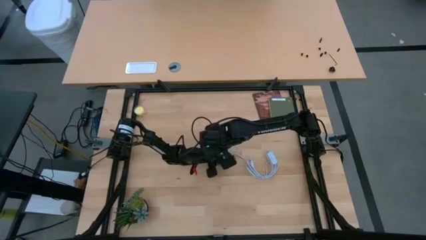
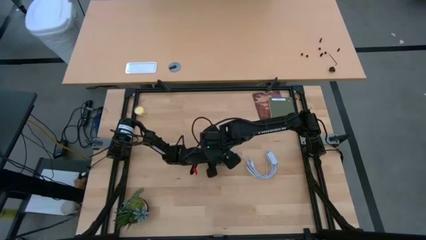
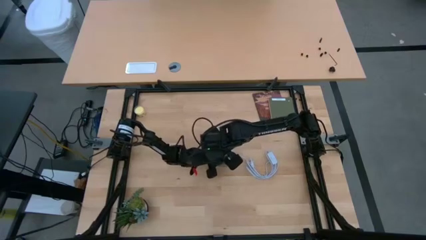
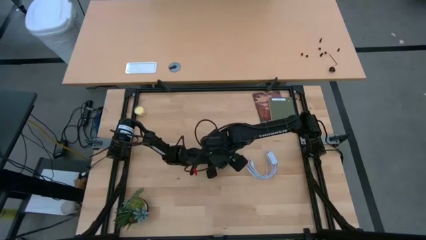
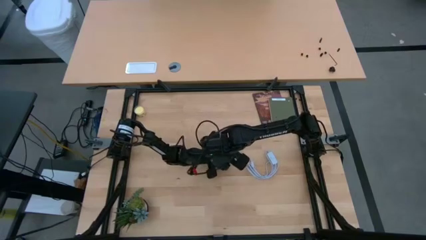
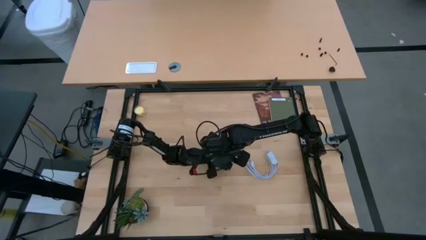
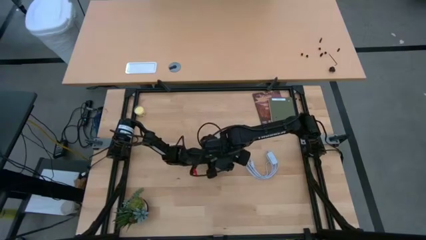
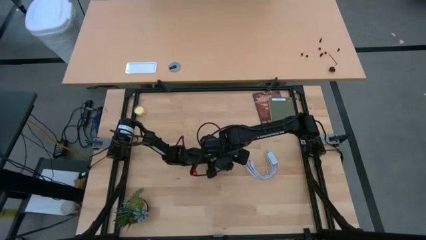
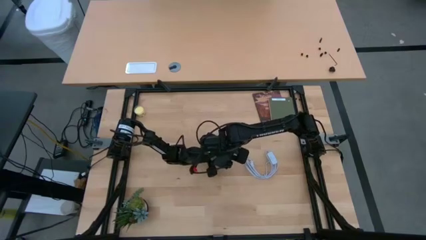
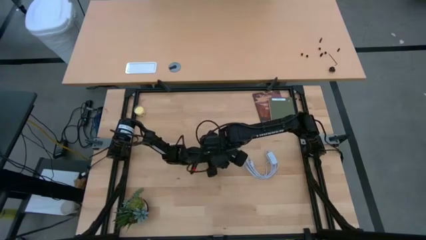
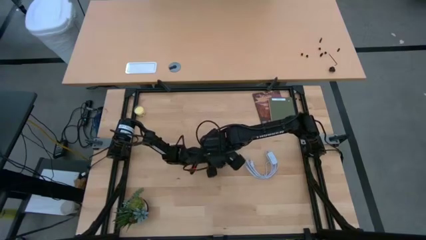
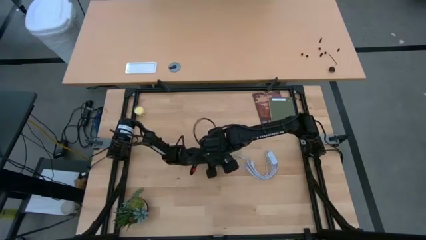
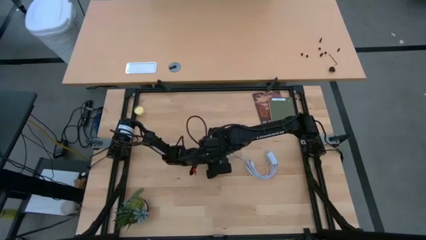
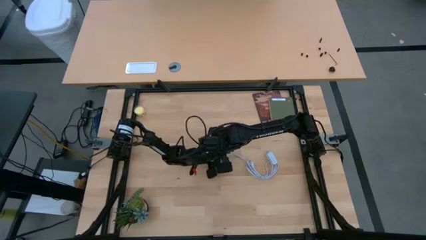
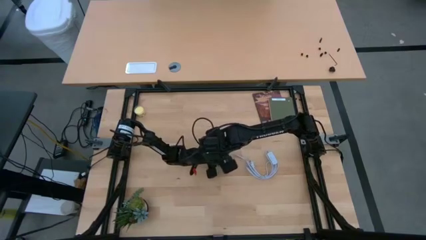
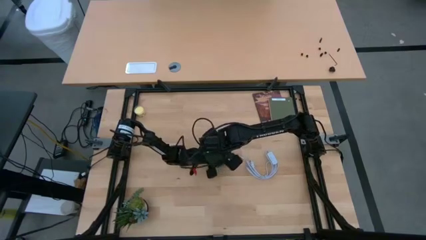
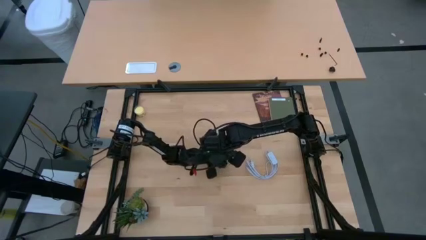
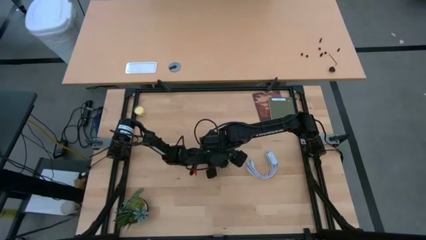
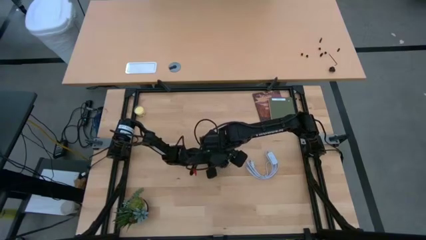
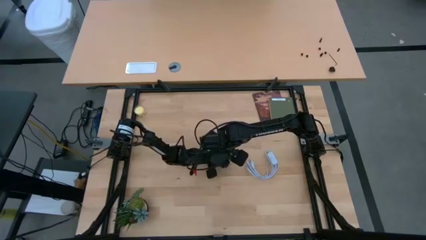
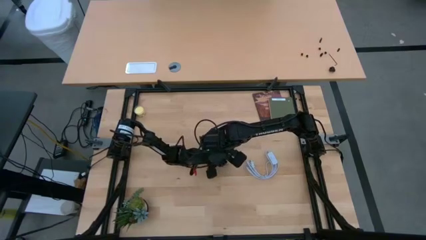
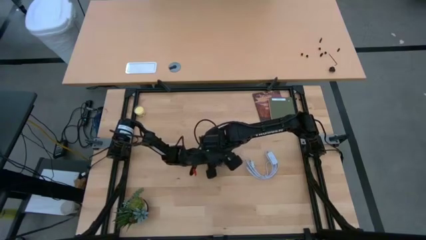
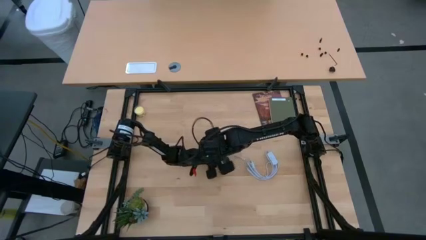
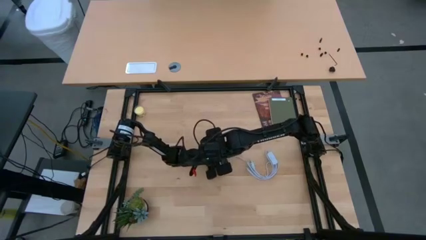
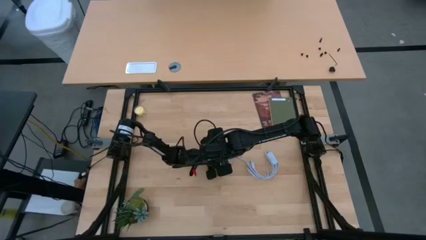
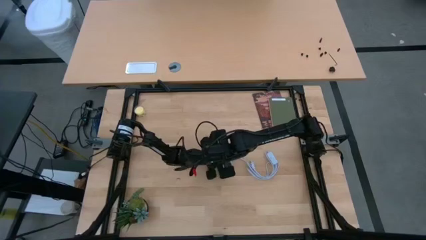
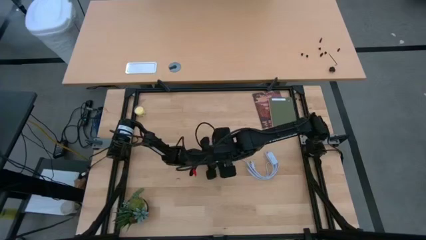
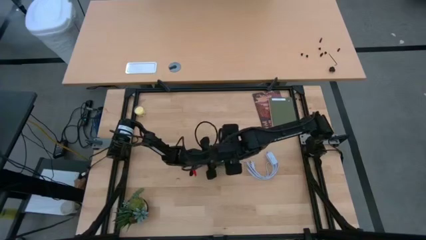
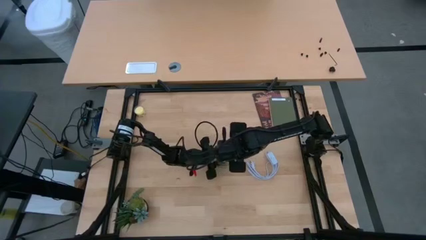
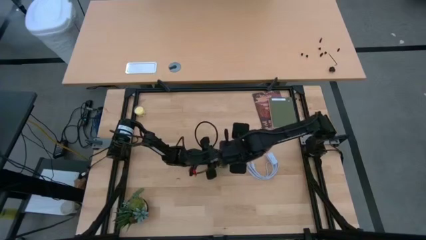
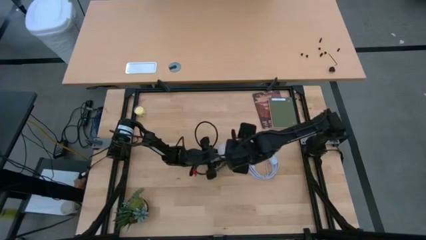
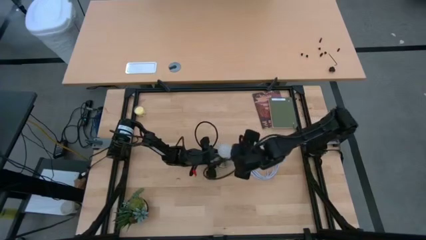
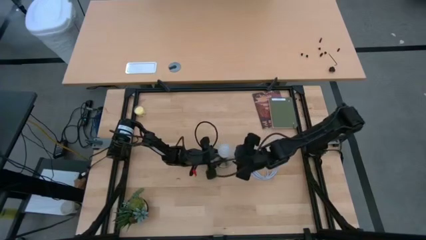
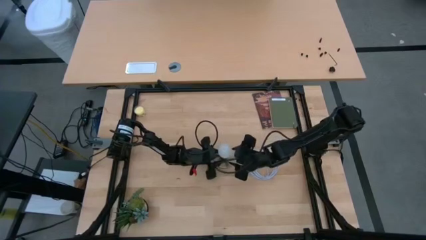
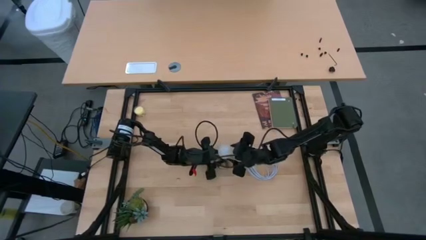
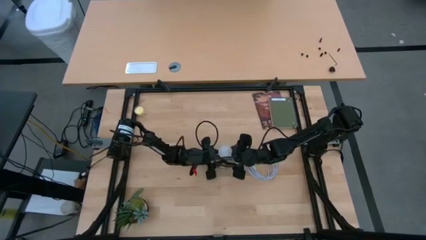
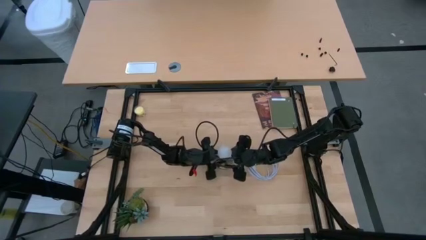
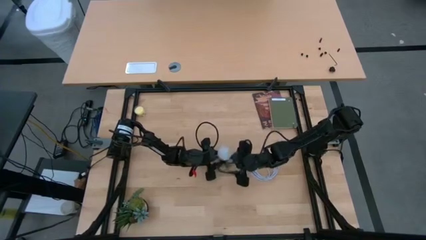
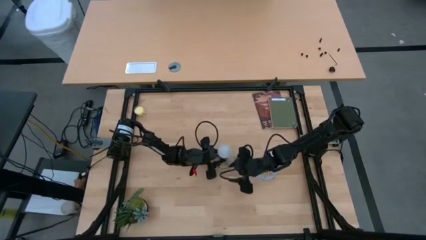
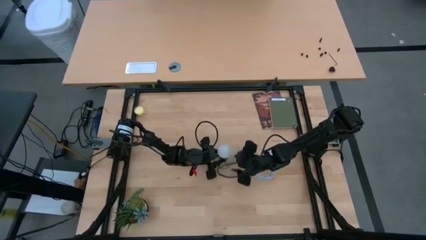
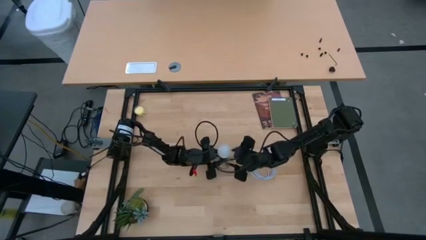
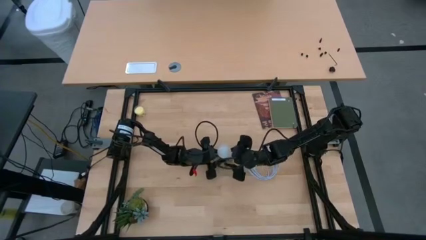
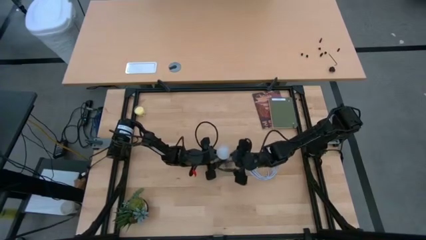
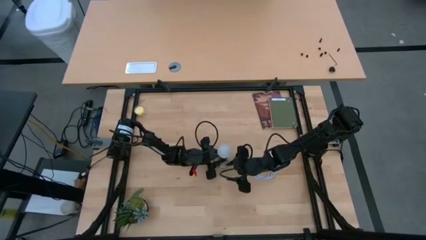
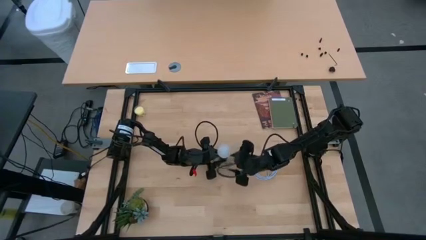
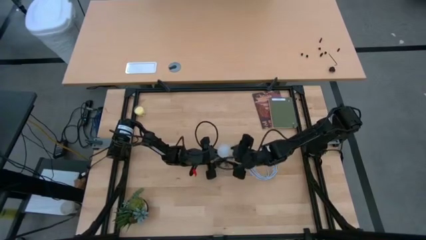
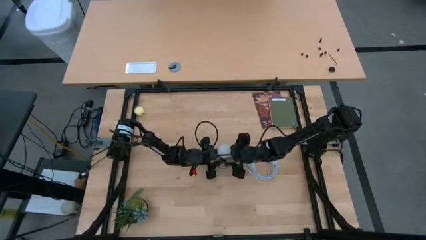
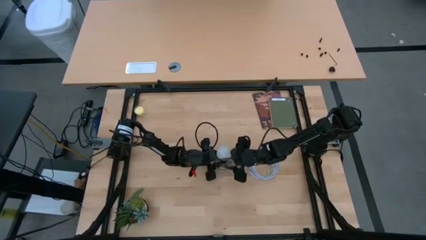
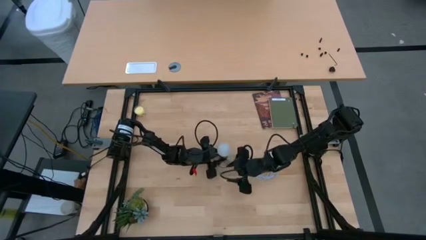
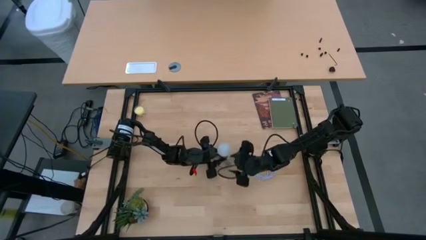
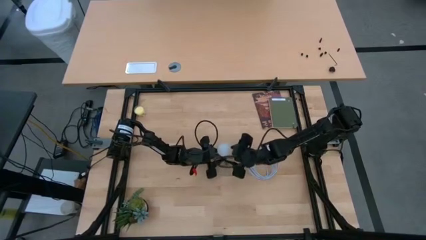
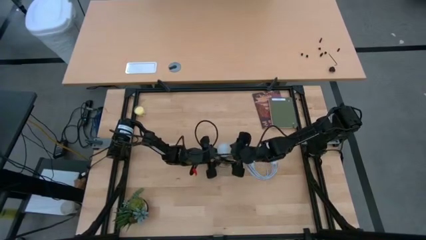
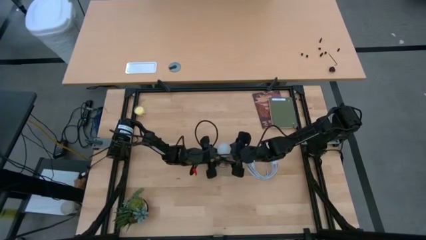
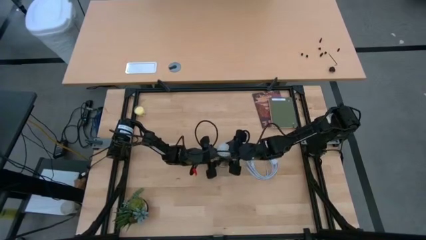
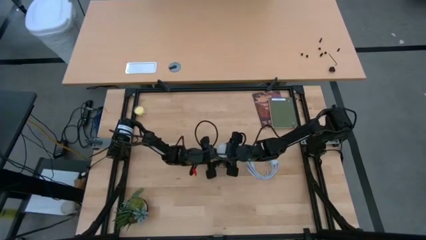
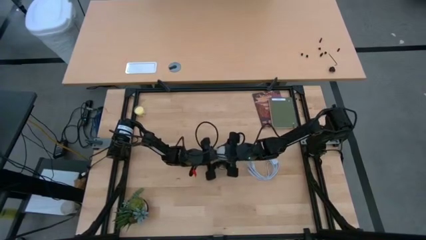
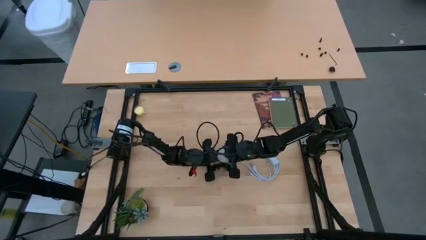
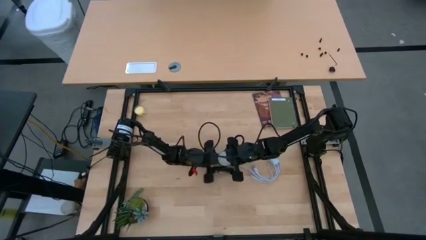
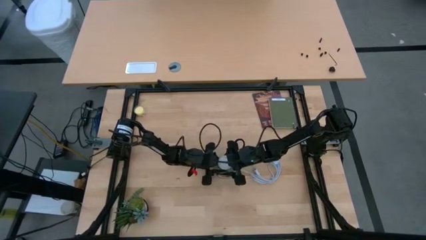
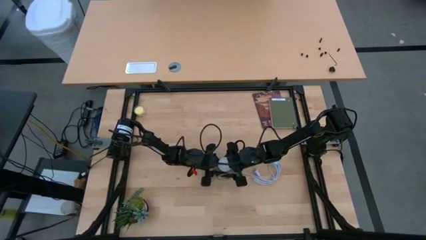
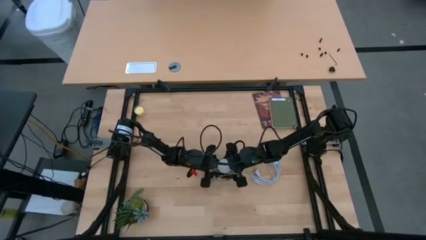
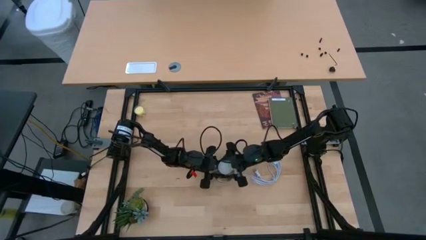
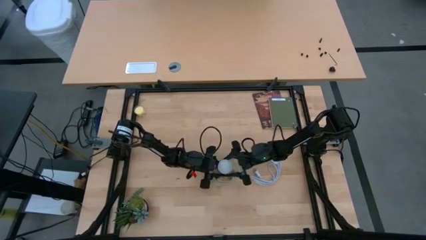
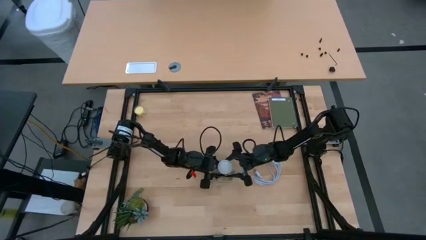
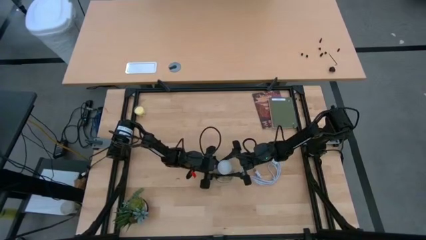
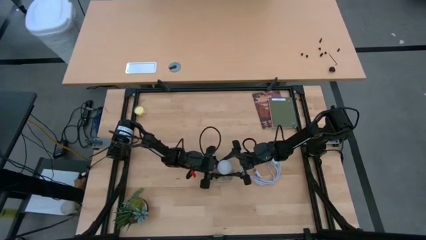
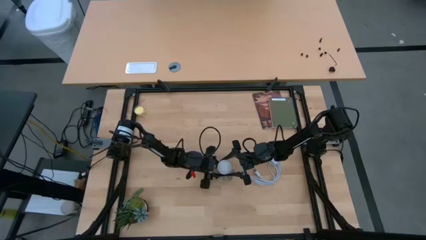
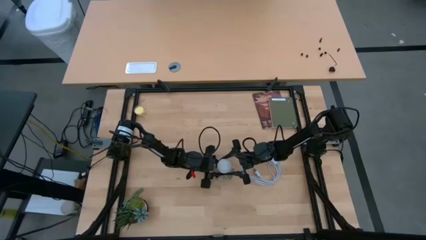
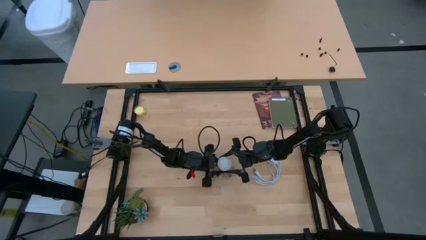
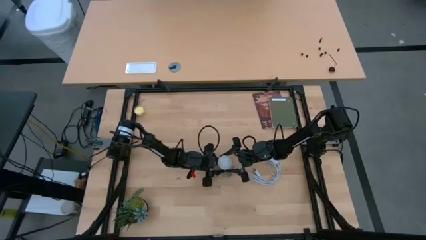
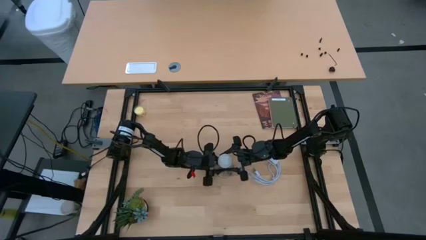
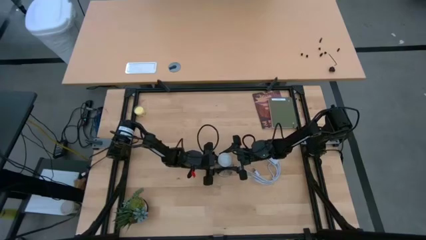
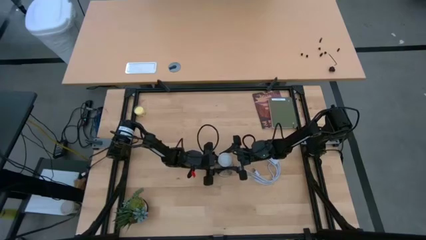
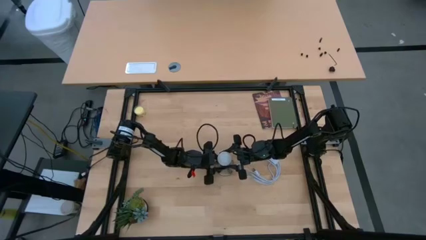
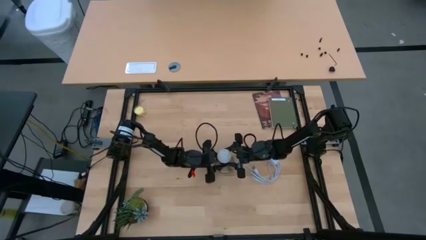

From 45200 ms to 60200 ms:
Task: Screw lightbulb
Insert the light bulb into the lamp
